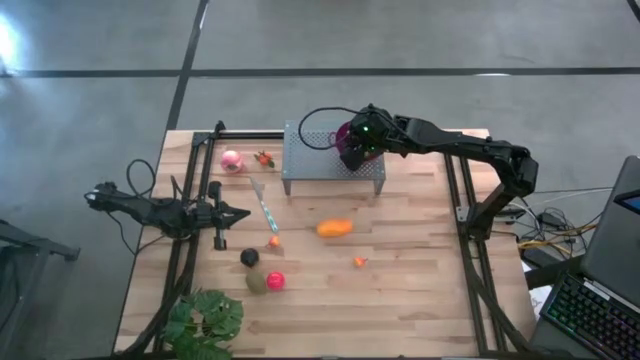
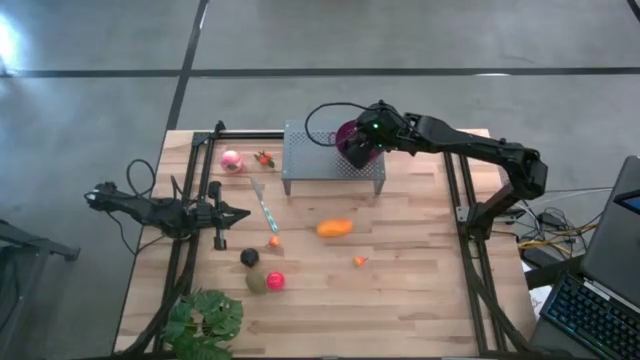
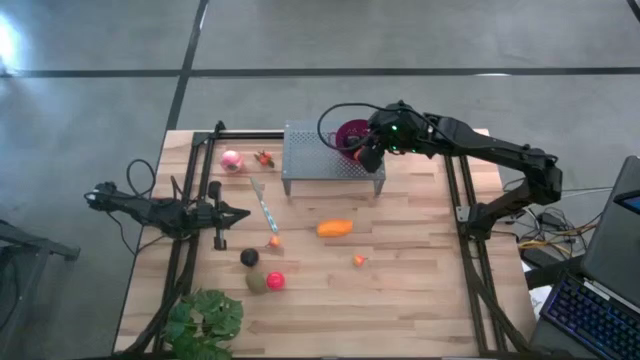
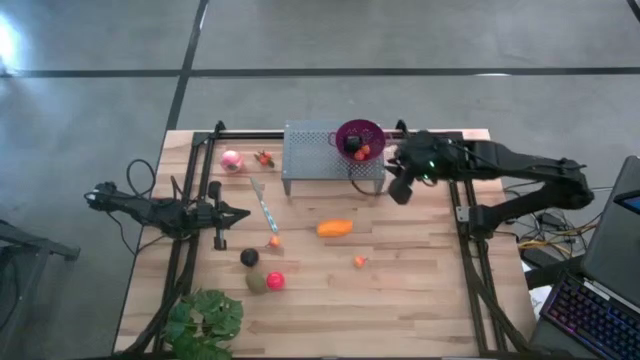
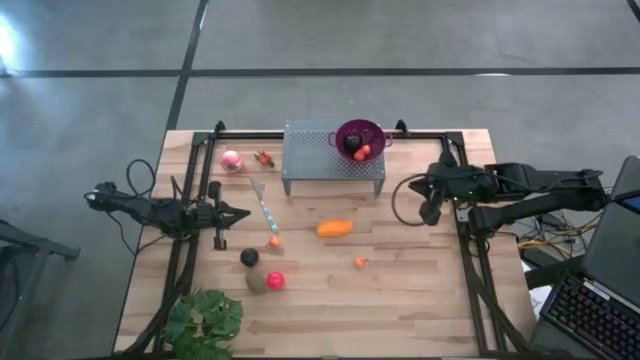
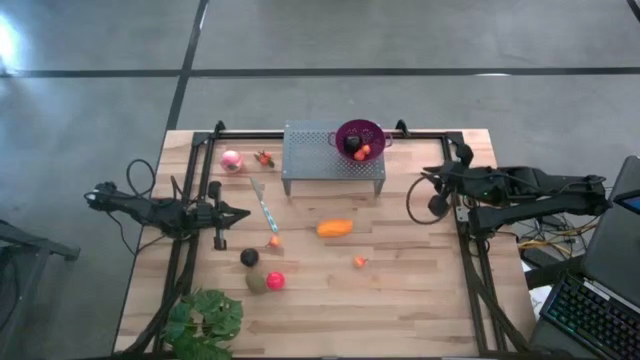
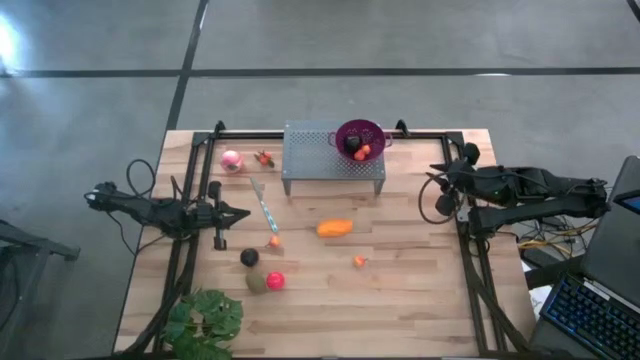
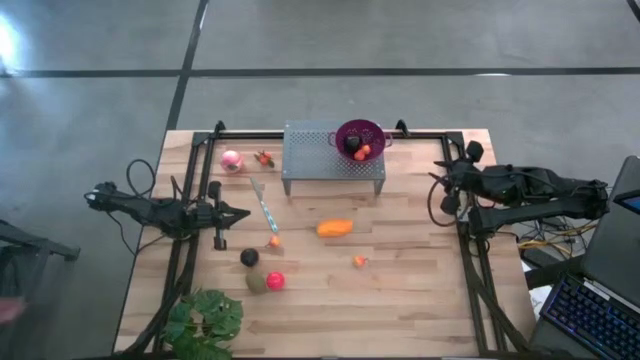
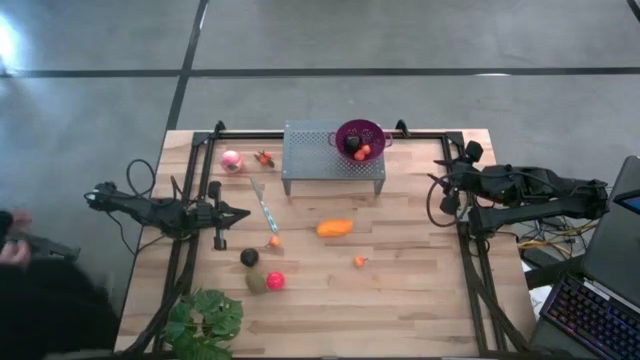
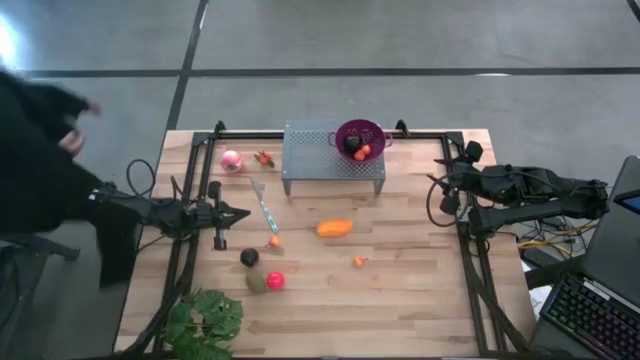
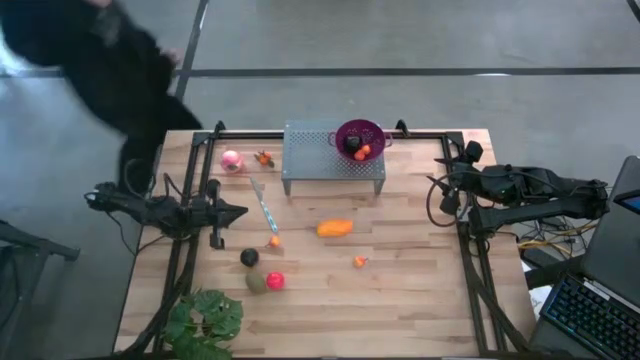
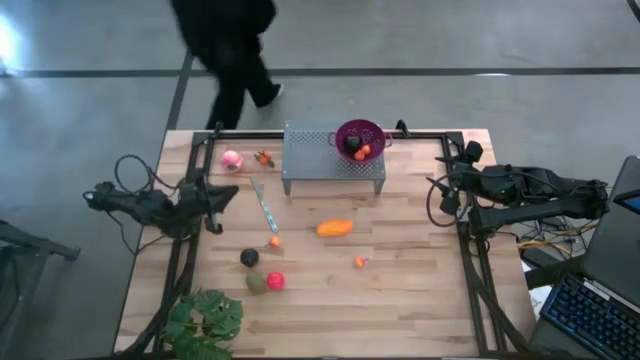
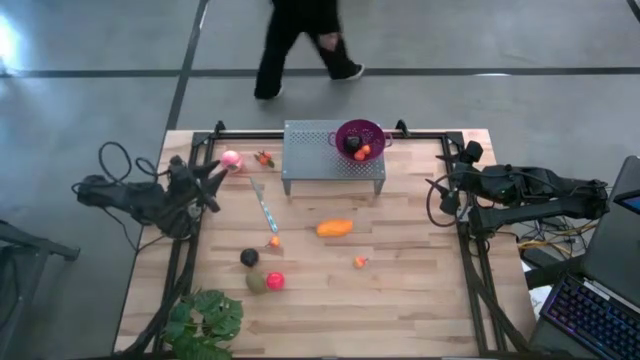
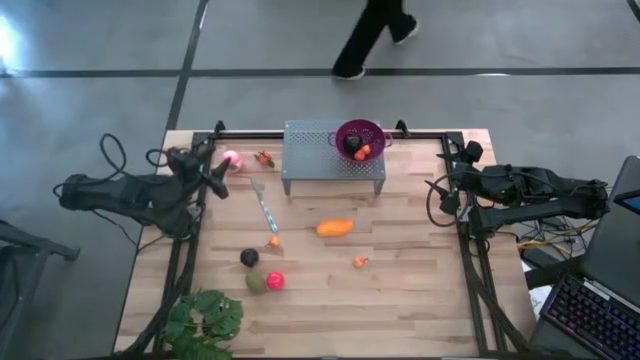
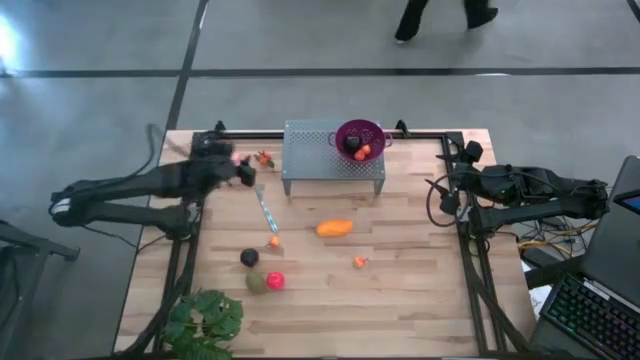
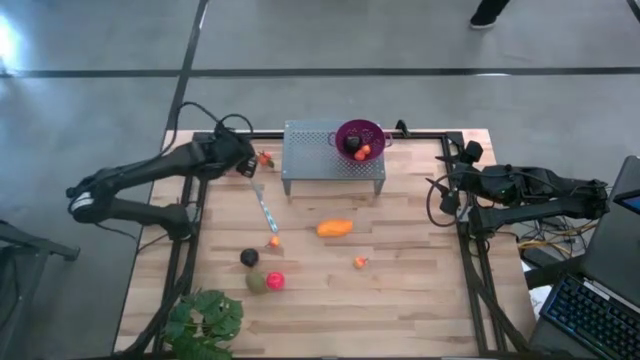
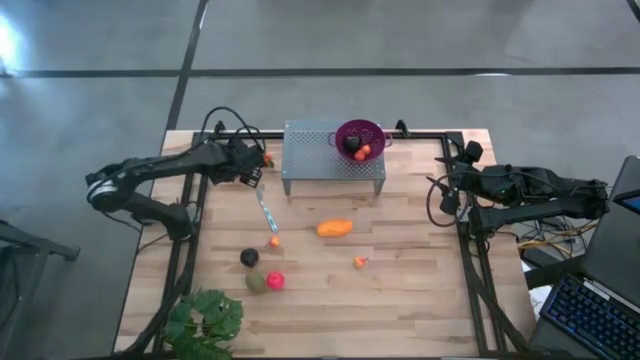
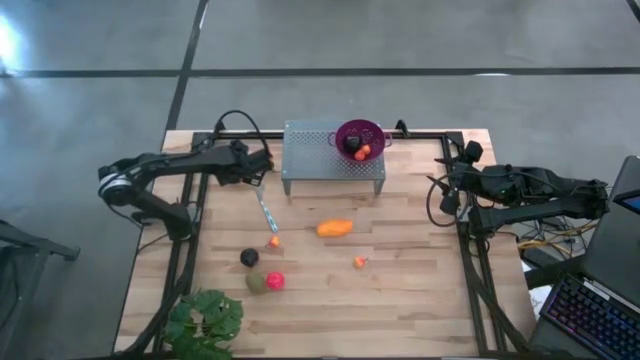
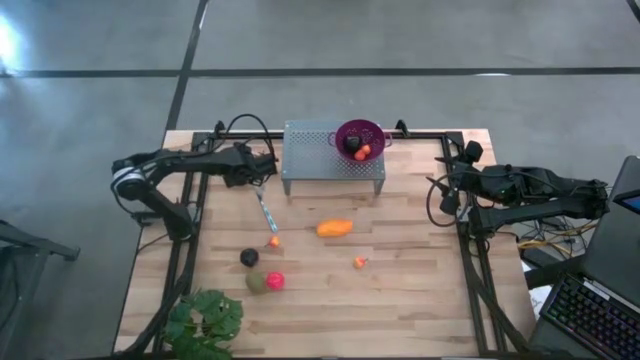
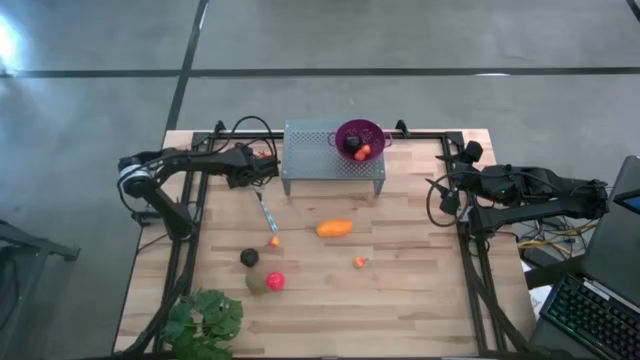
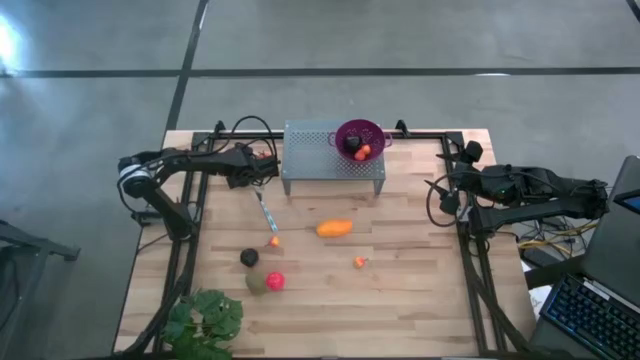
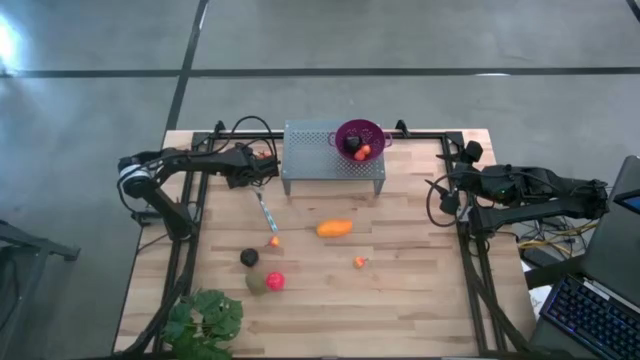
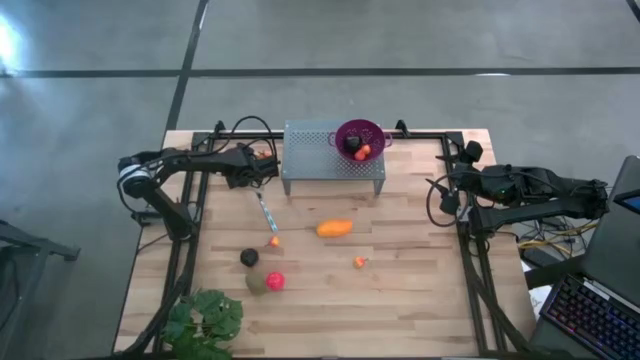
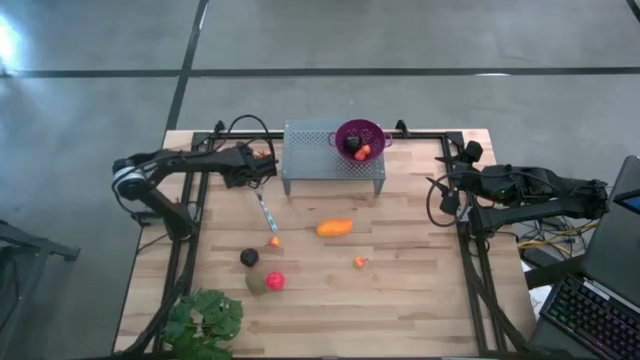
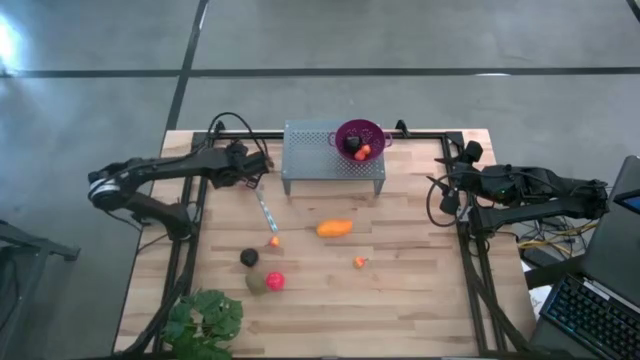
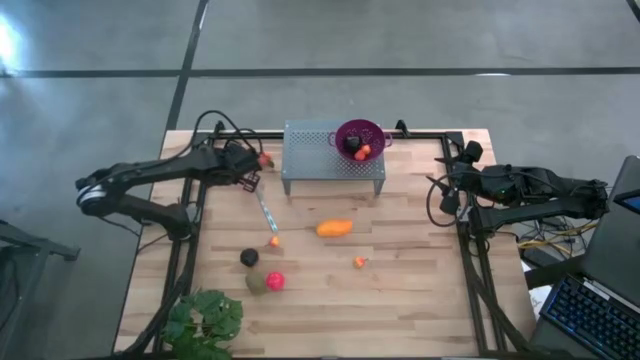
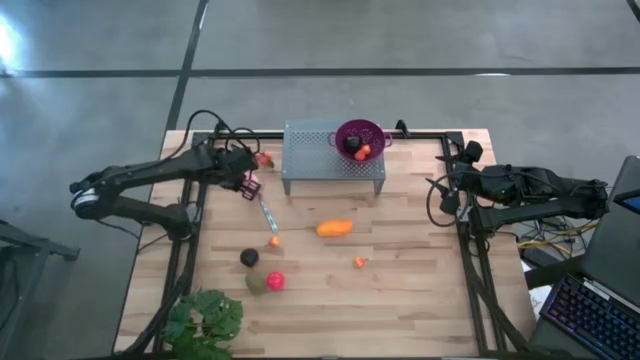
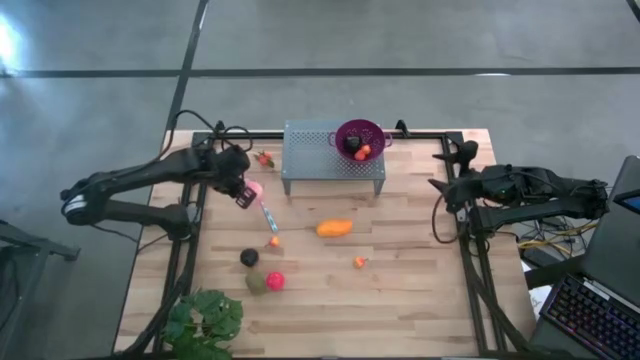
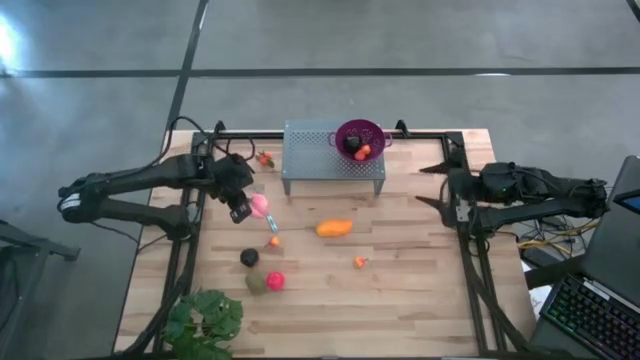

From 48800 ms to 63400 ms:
Task: Pick & Place Fruit
Put the peach into the purple bowl on the shelf

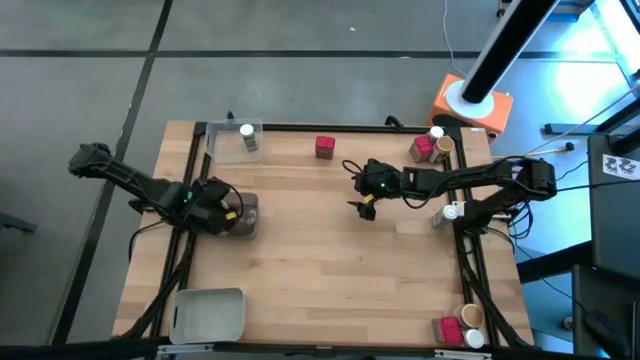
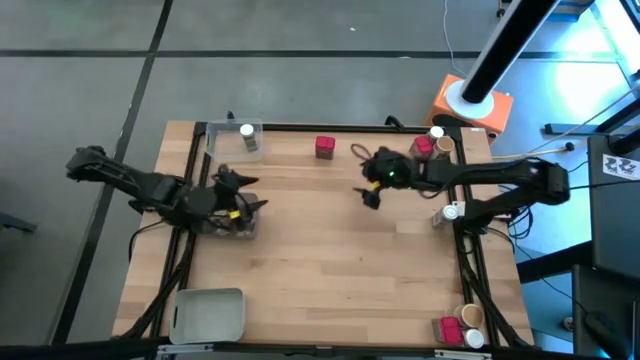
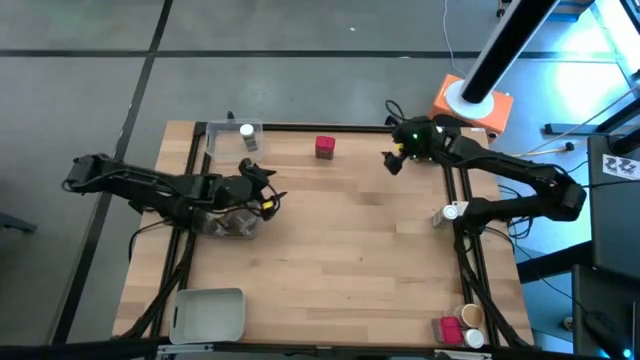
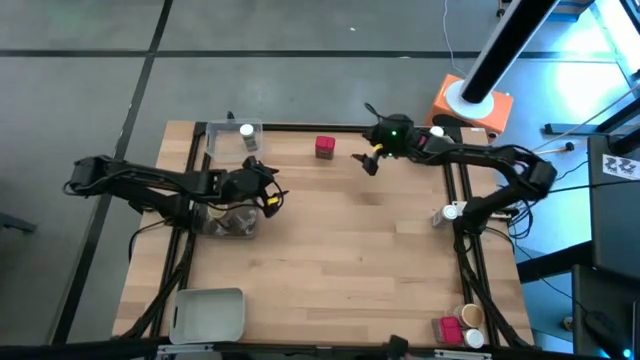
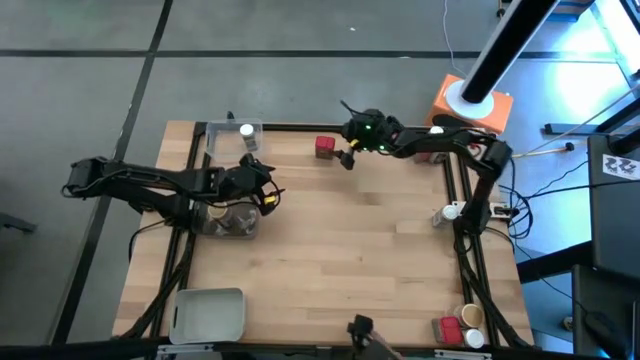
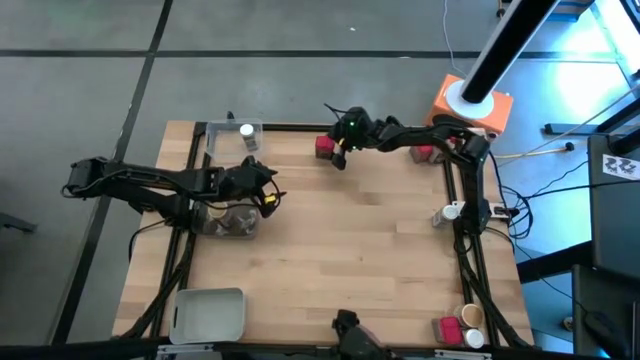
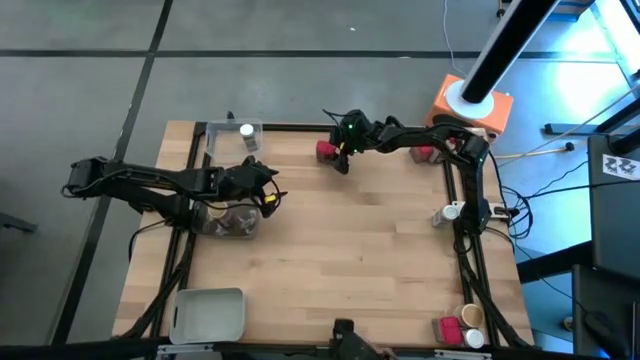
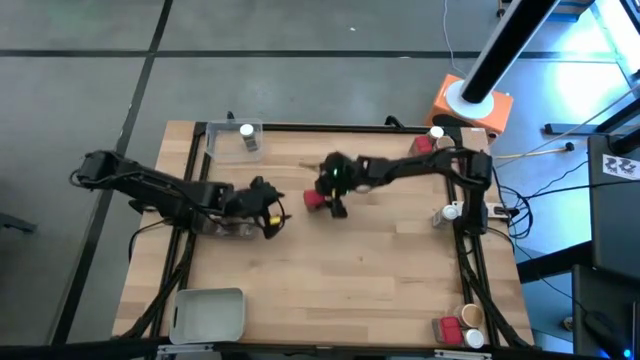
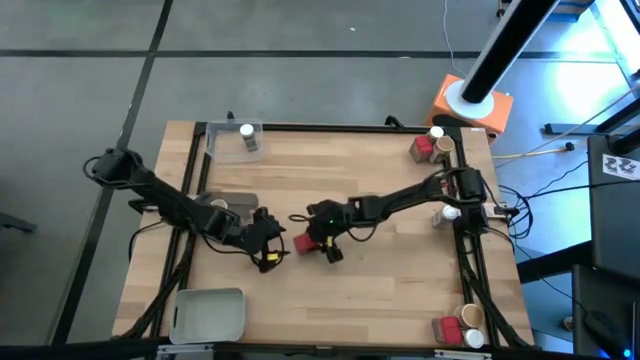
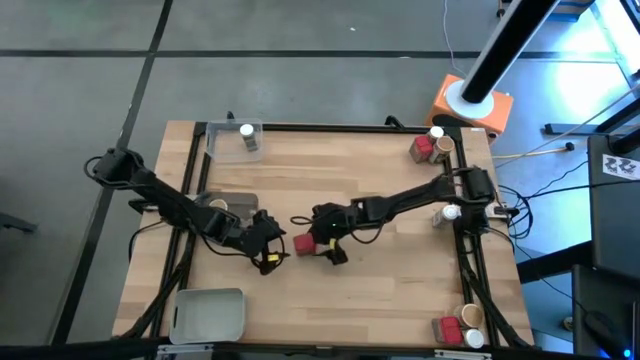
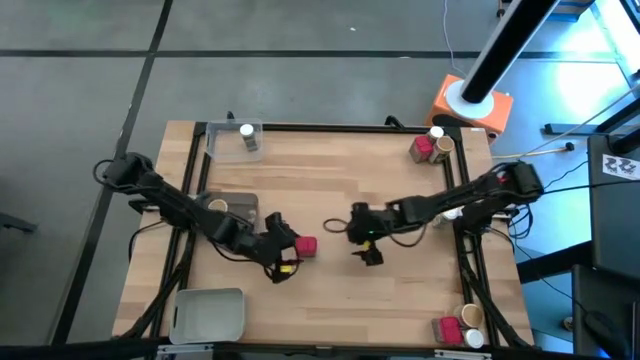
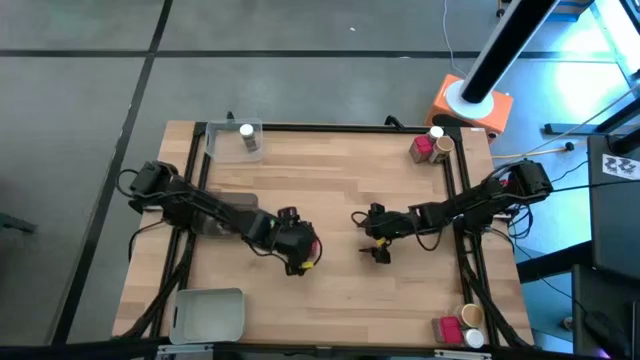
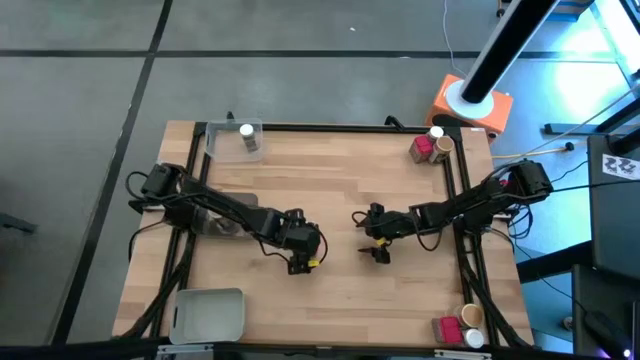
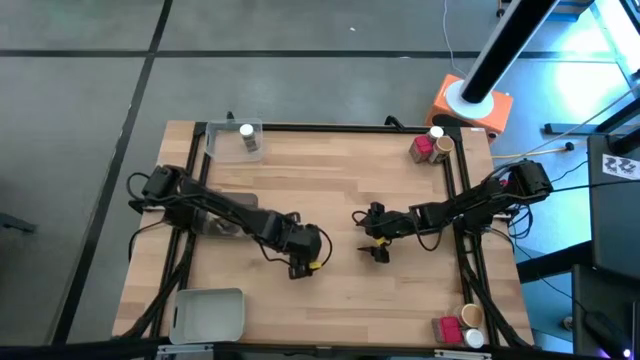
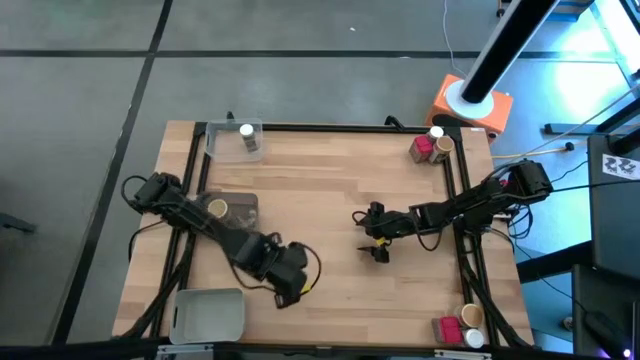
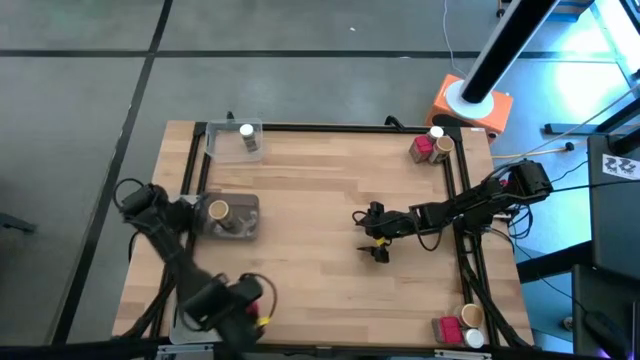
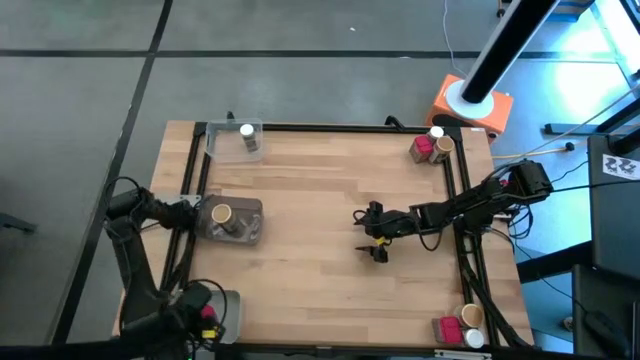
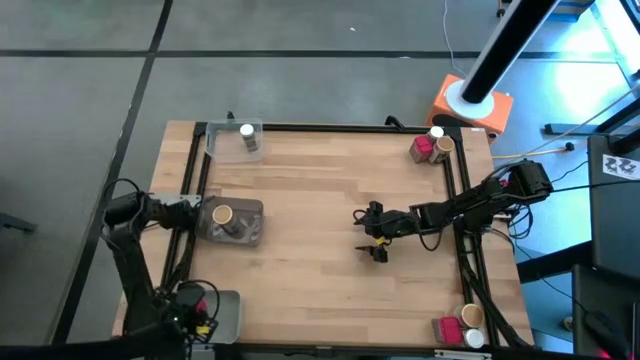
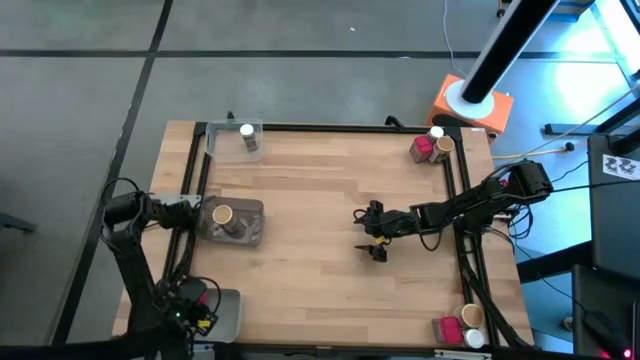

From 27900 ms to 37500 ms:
Task: Sort spices by type
Put the top left red spice can into the gray bin
